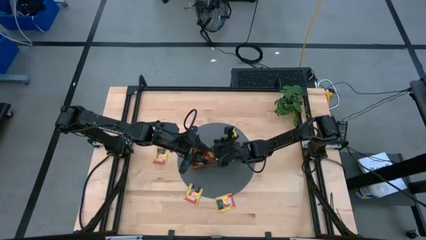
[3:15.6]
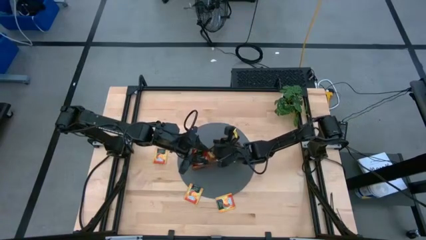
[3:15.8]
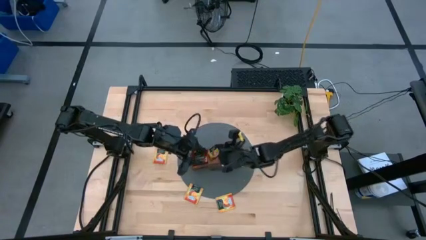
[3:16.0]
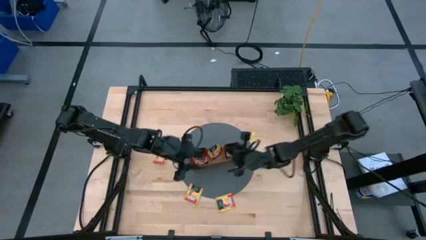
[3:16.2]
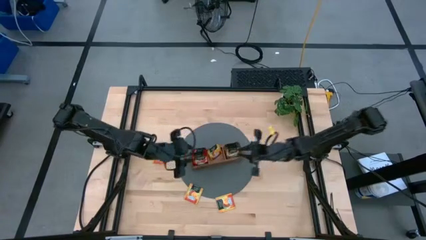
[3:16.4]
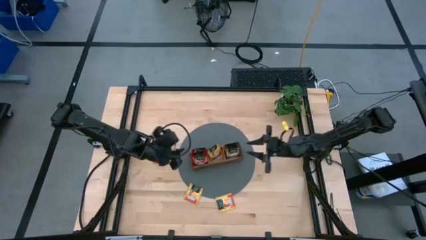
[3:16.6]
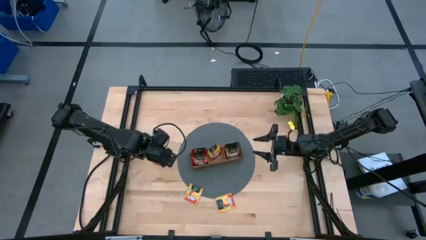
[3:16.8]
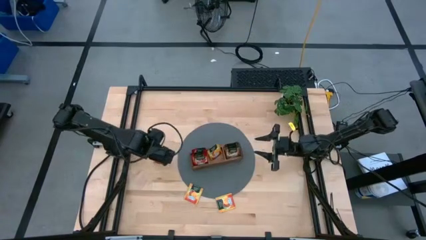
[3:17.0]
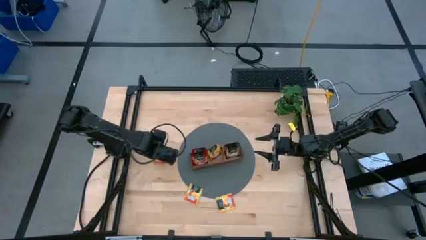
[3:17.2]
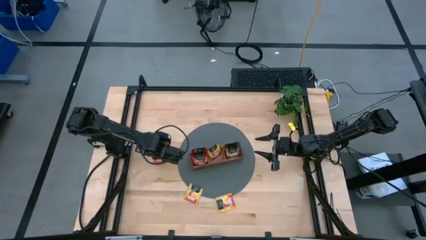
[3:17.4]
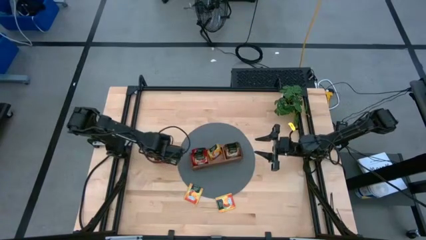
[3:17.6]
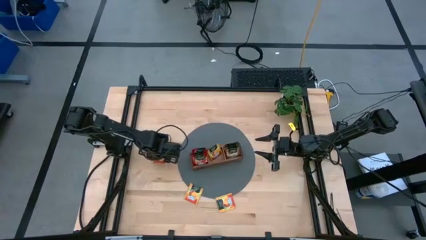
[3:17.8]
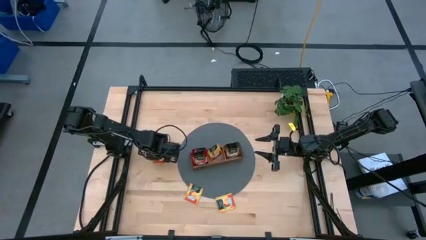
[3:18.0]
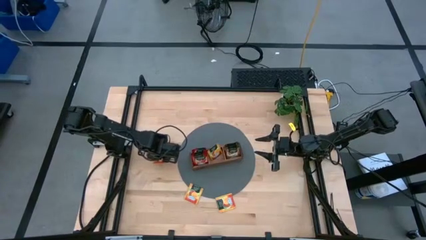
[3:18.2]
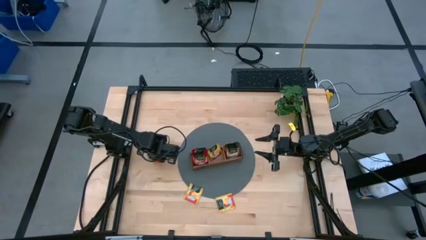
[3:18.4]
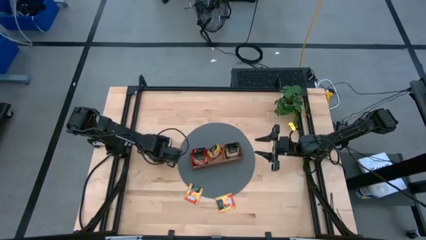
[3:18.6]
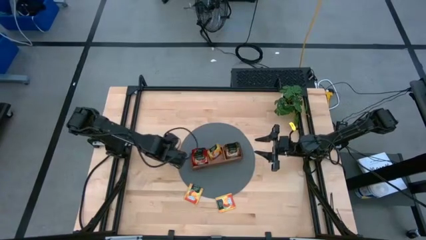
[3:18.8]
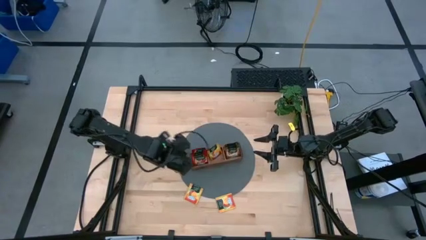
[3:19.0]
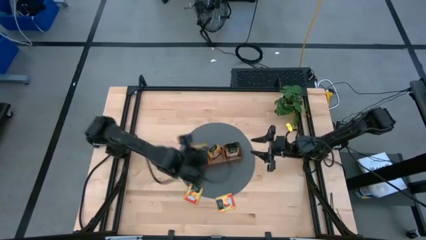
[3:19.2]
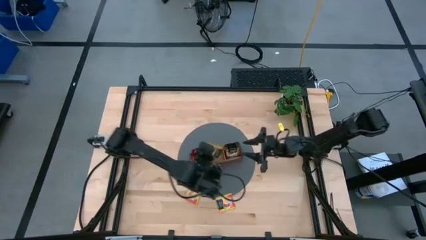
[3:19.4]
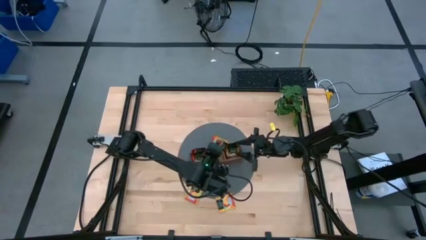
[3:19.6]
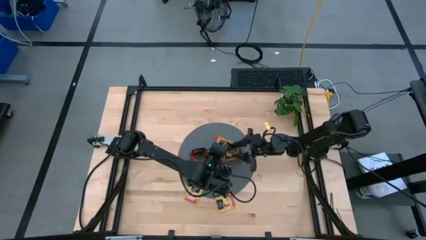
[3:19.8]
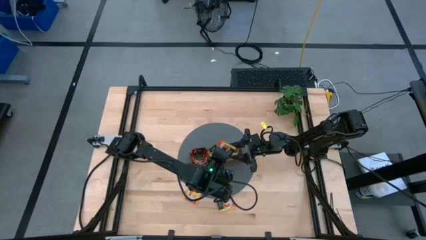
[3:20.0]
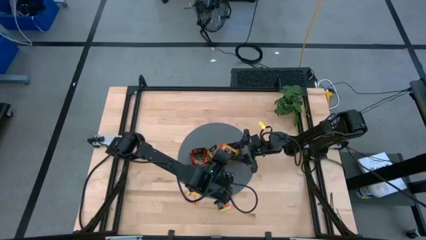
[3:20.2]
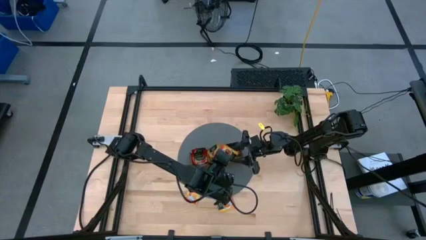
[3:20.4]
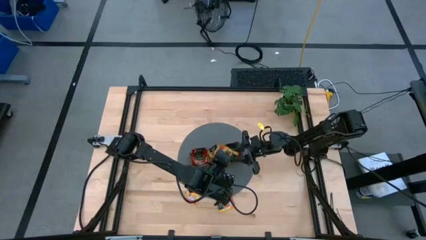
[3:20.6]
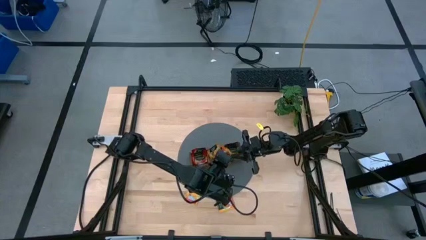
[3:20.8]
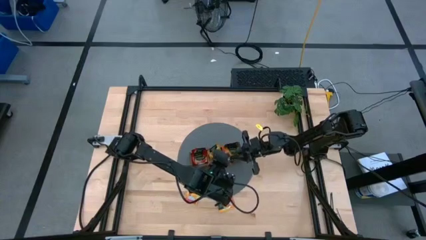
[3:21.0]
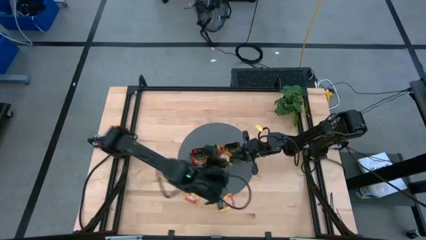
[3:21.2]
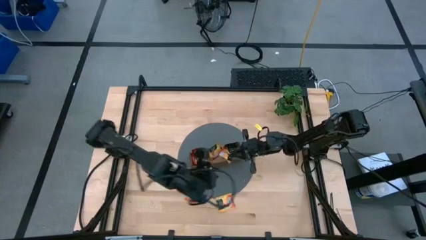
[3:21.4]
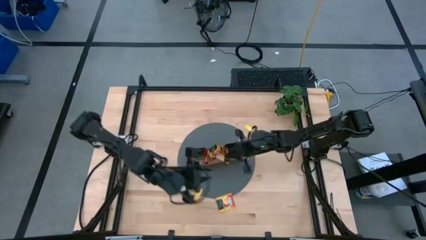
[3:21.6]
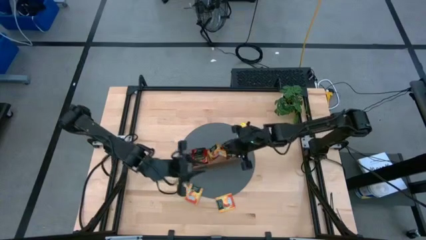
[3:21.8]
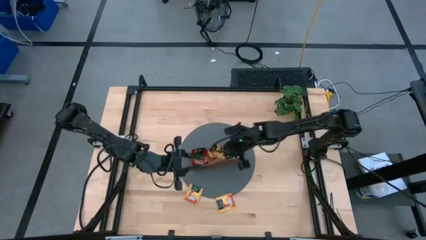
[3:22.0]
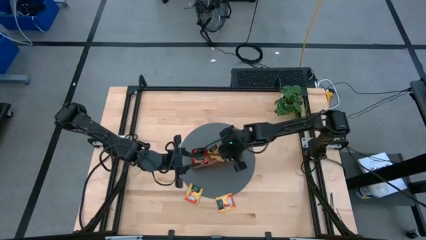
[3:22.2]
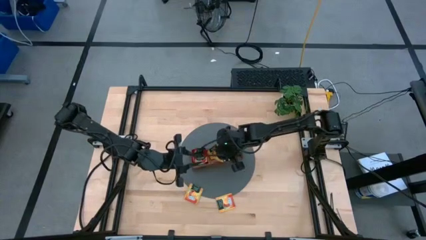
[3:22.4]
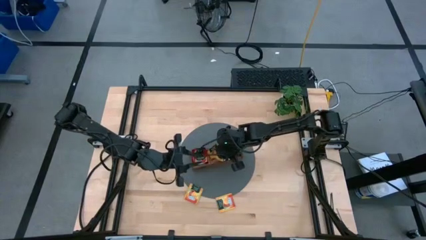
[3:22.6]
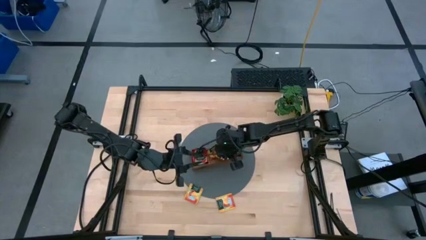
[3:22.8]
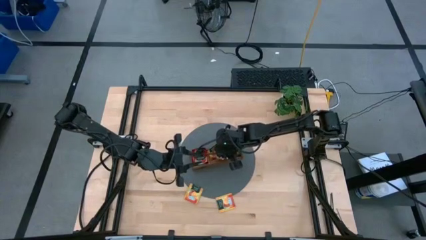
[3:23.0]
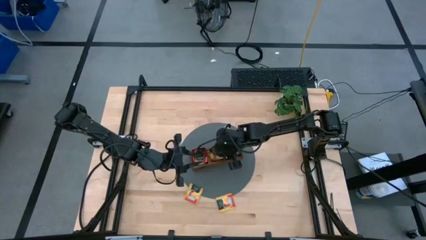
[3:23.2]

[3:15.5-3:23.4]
Task: Pick & Place Tea
Put the yellow tea bag into the middle section of the wooden organizer

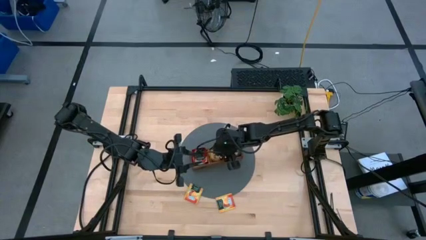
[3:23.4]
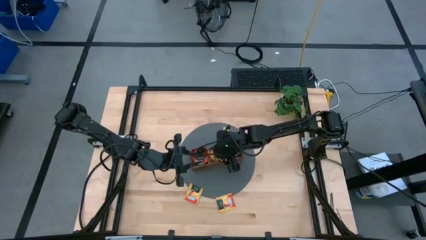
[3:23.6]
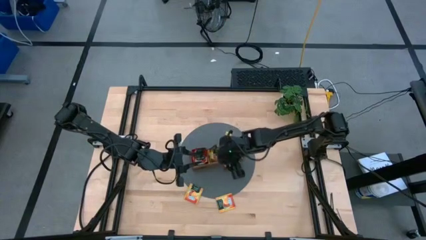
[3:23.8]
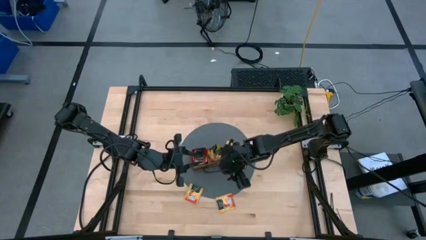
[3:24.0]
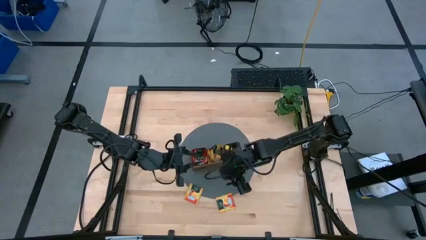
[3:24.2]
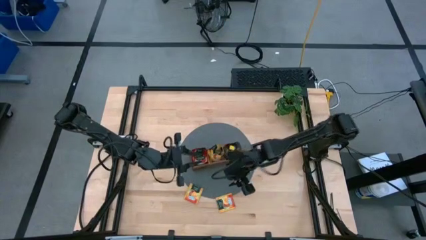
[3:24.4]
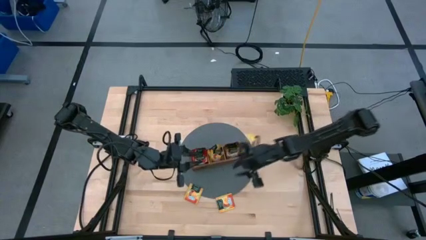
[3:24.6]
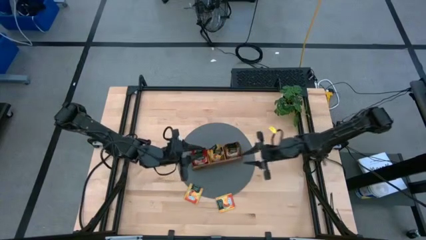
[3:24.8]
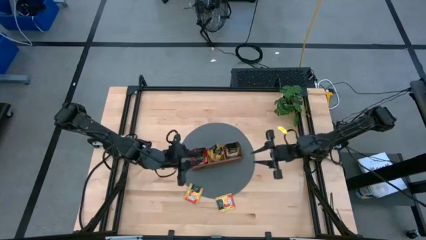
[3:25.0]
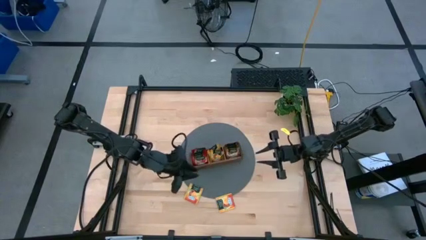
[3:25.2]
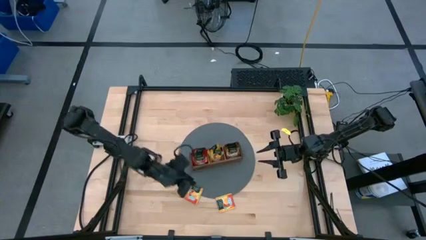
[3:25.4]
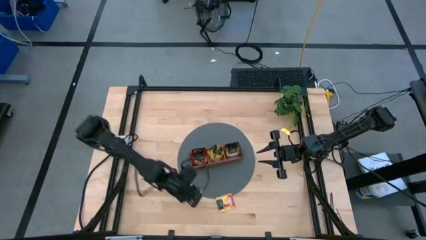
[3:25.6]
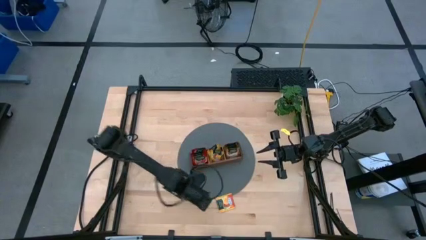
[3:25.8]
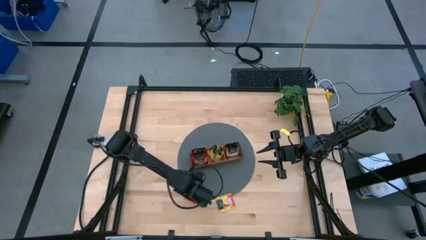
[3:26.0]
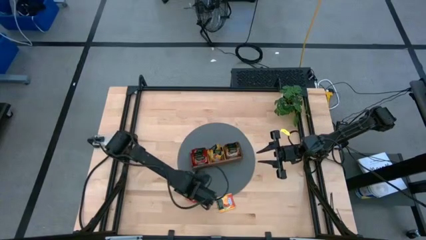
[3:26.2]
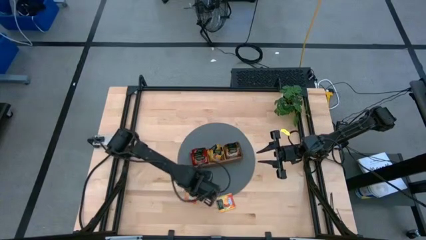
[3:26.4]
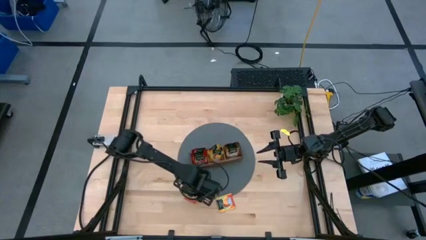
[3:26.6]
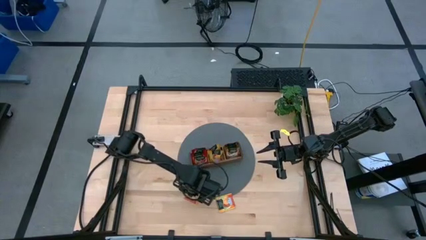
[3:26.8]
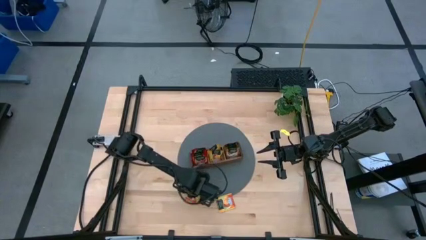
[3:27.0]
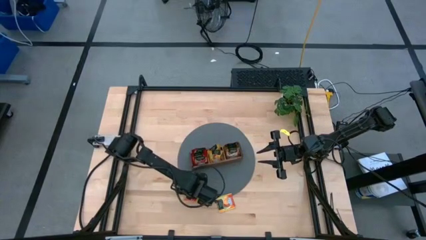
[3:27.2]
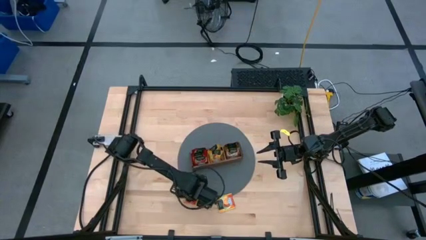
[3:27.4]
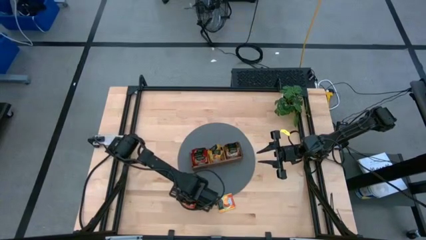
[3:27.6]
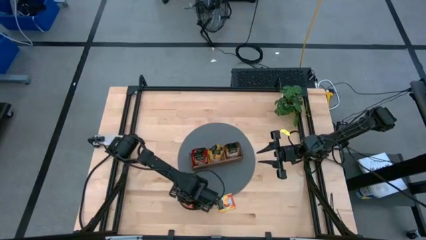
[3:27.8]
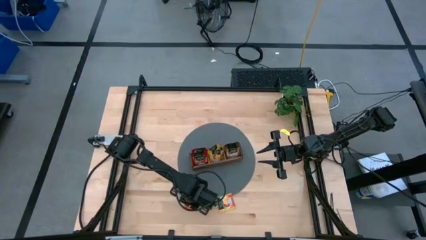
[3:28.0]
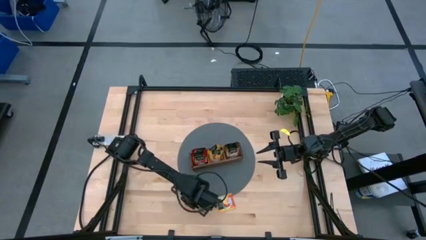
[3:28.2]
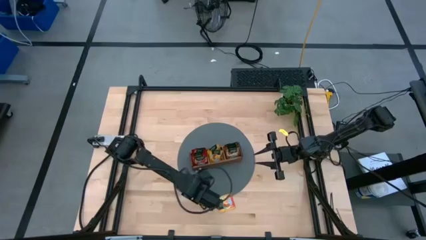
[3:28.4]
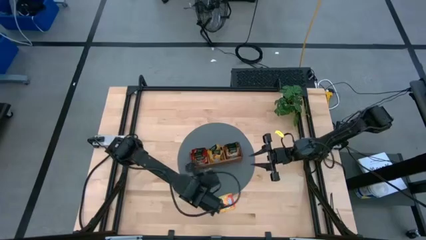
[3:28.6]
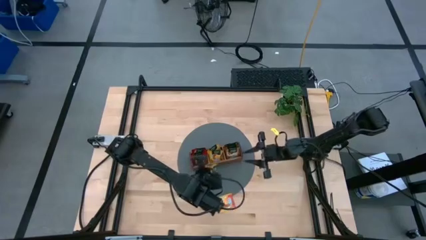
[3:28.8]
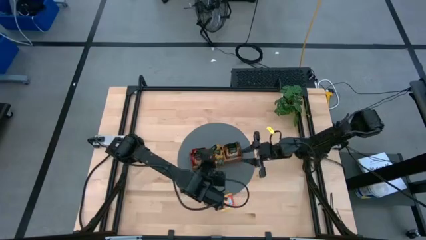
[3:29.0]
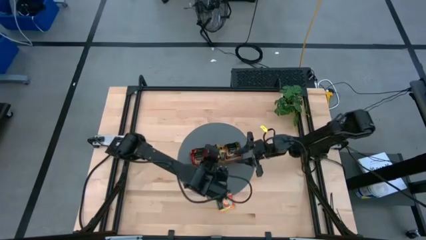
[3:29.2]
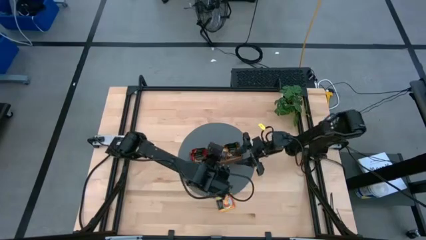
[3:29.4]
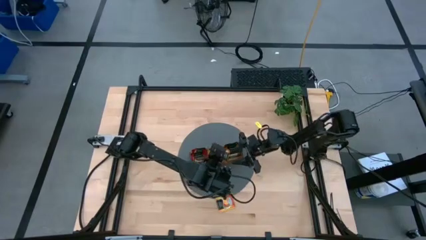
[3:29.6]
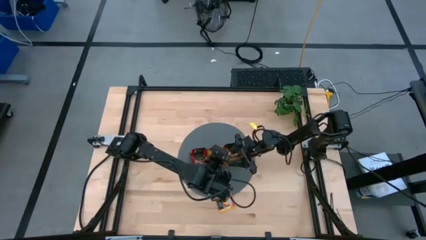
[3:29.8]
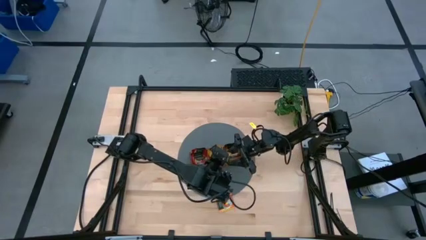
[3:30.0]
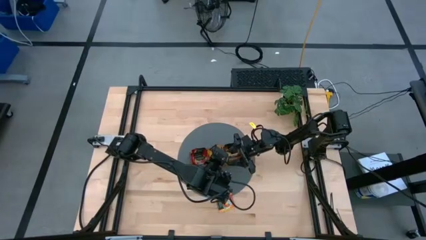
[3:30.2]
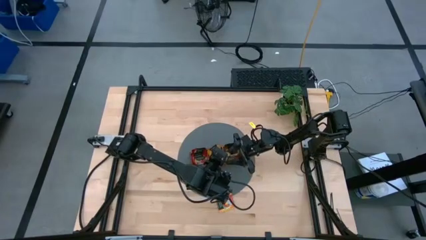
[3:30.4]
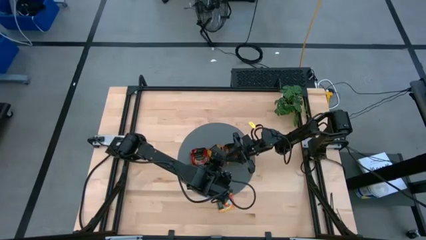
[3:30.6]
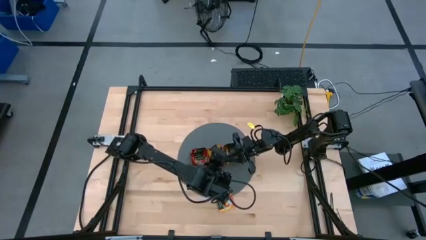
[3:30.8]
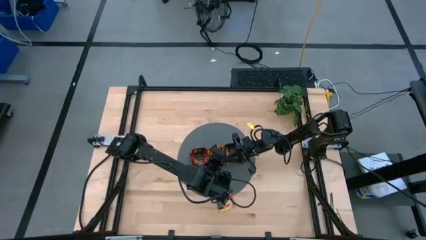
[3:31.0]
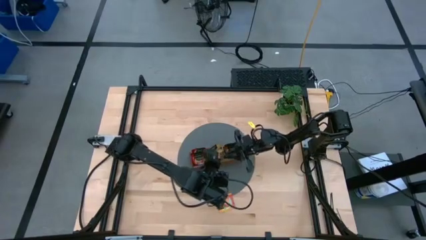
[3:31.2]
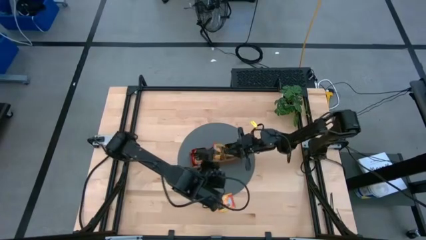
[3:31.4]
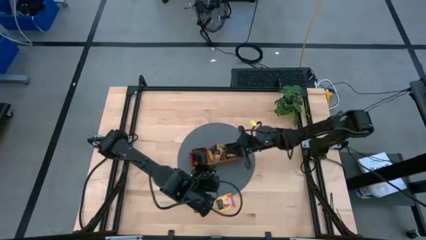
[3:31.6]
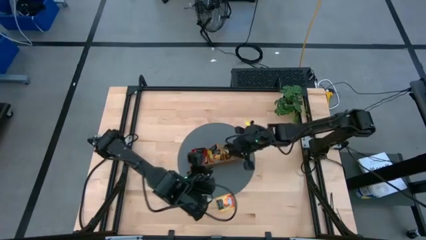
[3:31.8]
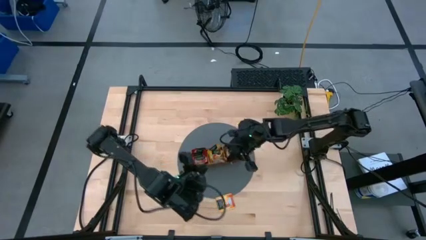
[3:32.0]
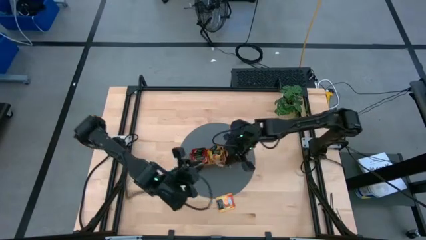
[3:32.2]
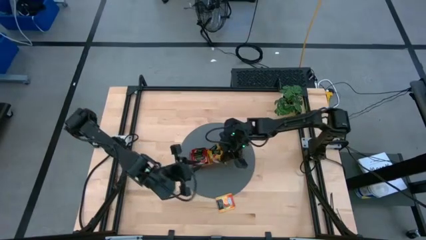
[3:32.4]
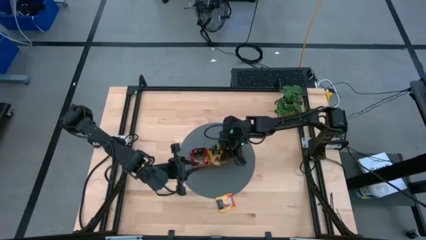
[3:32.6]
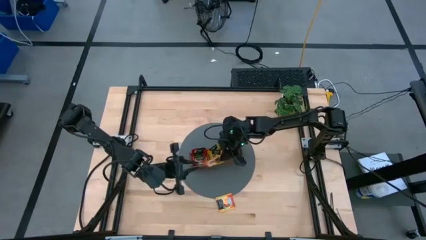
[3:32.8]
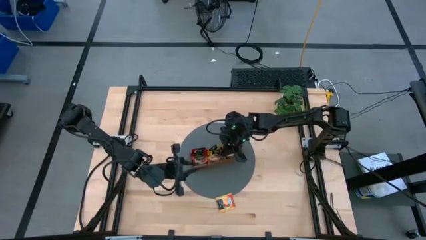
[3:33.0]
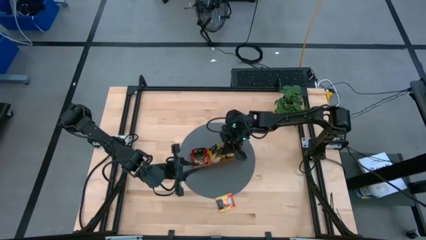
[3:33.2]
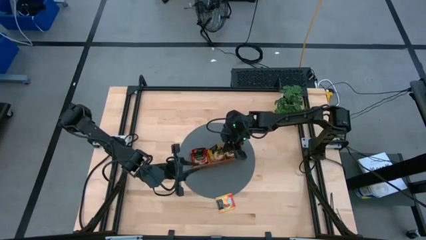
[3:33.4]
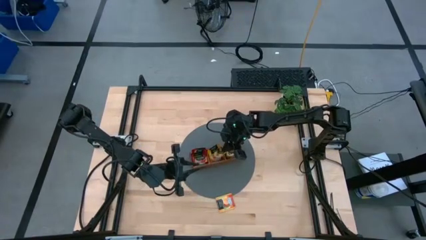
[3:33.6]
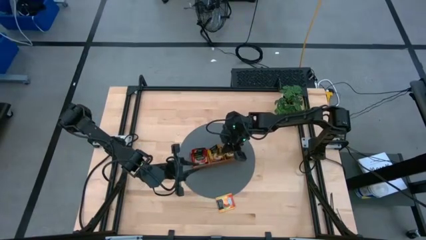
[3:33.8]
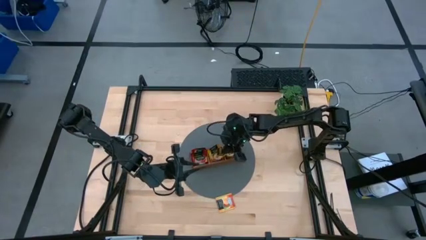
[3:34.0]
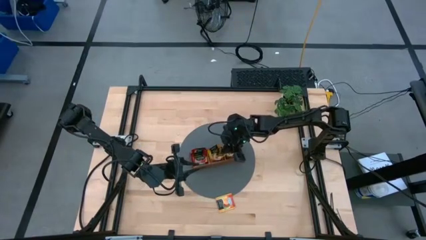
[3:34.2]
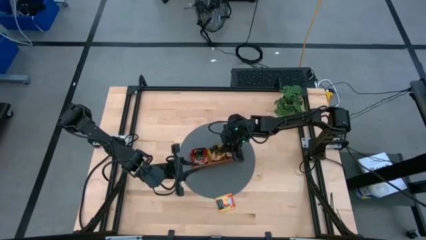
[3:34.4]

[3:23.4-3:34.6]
Put the yellow tea bag into the middle section of the wooden organizer
